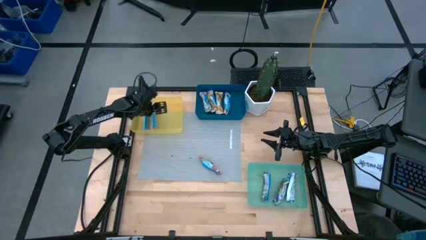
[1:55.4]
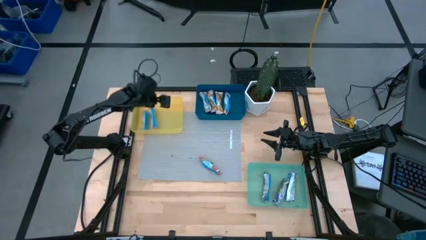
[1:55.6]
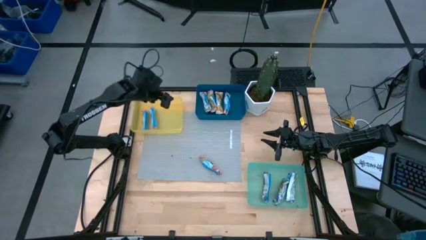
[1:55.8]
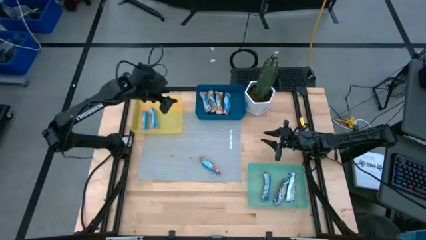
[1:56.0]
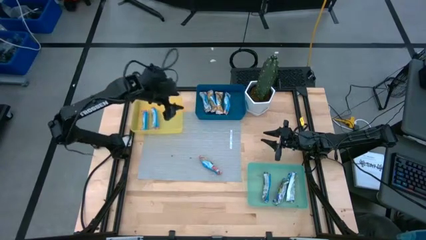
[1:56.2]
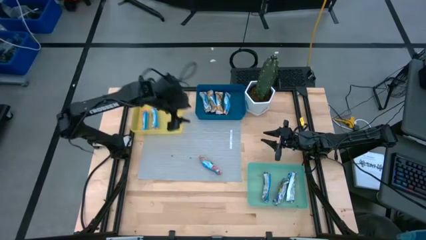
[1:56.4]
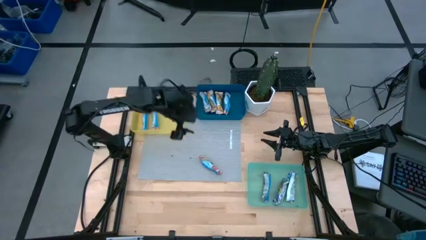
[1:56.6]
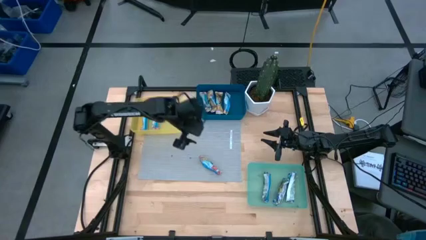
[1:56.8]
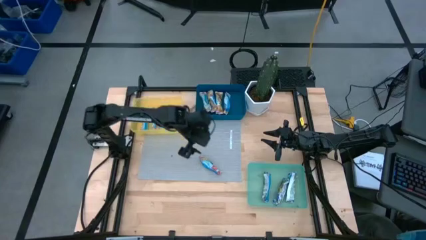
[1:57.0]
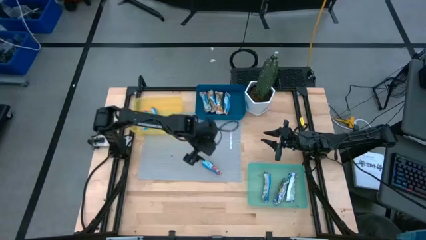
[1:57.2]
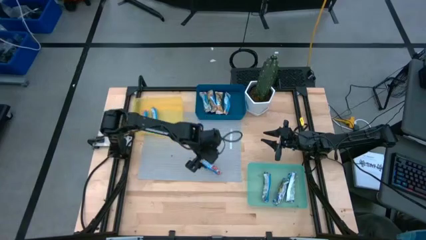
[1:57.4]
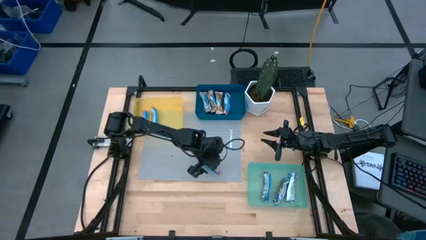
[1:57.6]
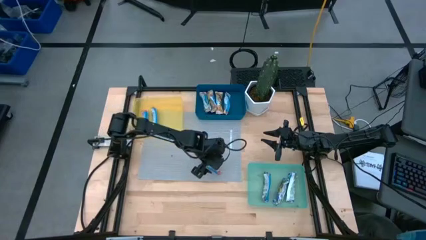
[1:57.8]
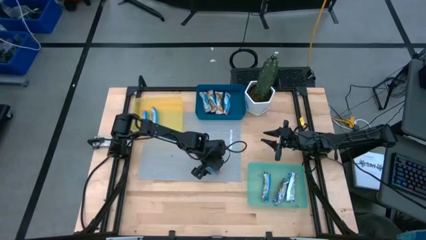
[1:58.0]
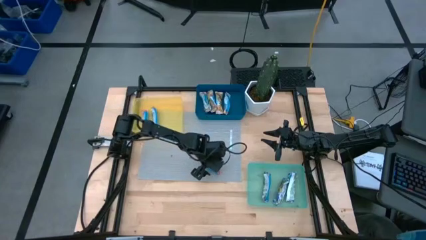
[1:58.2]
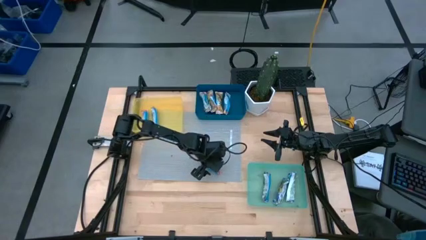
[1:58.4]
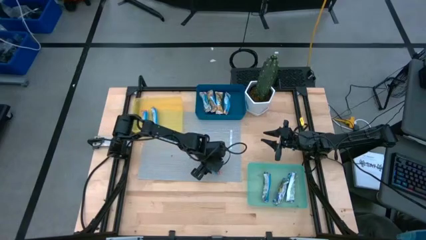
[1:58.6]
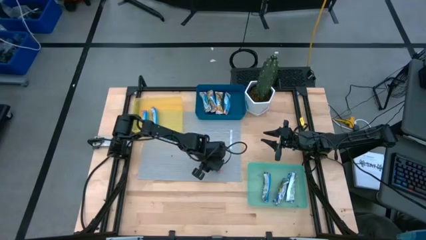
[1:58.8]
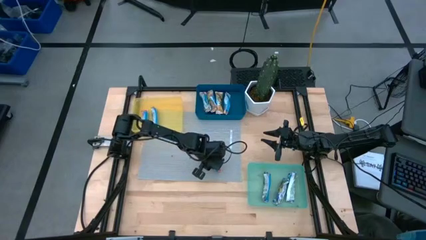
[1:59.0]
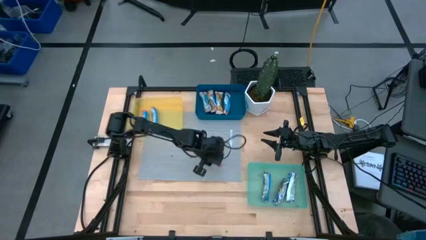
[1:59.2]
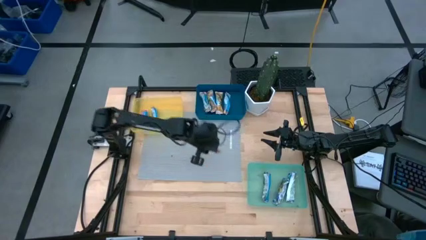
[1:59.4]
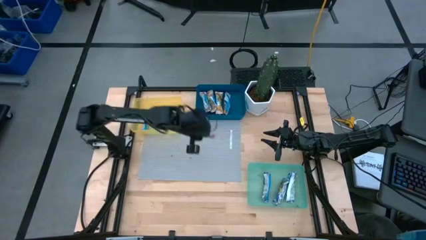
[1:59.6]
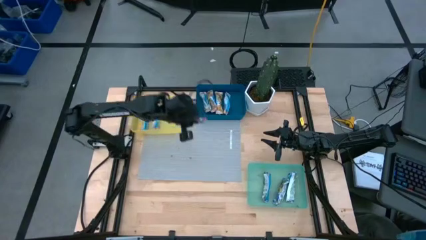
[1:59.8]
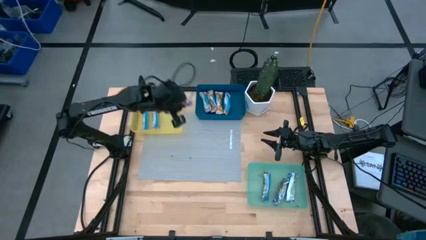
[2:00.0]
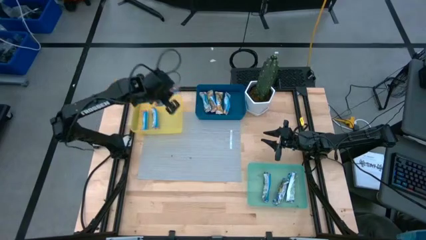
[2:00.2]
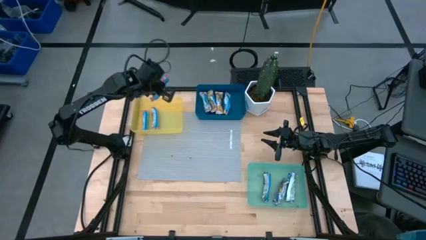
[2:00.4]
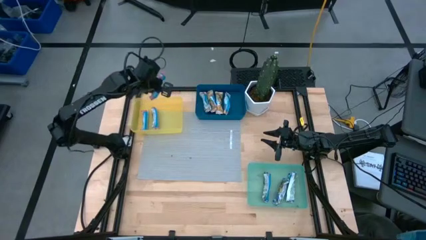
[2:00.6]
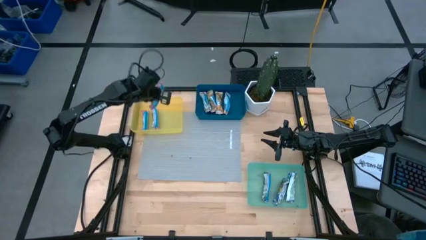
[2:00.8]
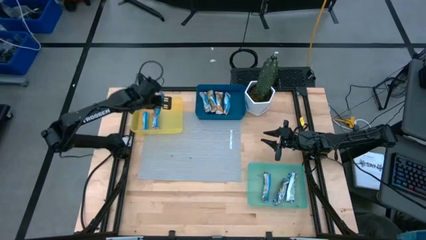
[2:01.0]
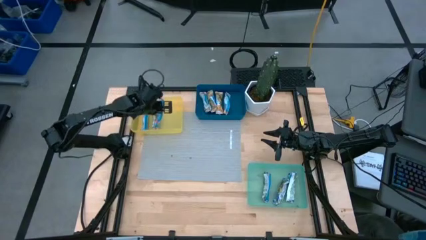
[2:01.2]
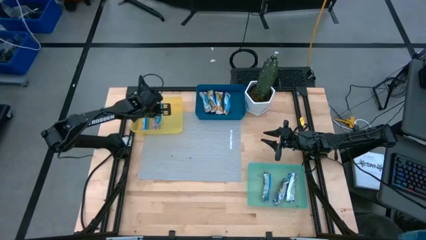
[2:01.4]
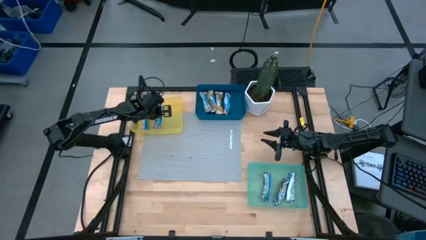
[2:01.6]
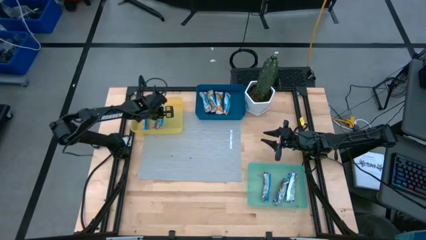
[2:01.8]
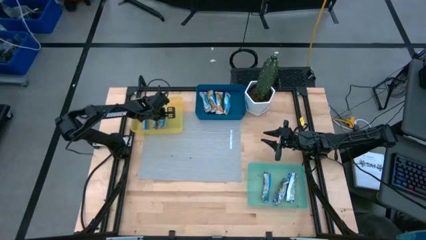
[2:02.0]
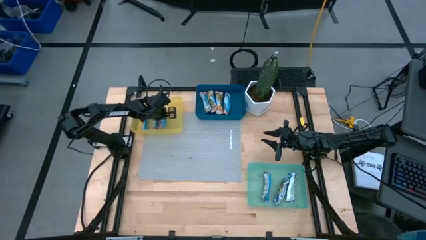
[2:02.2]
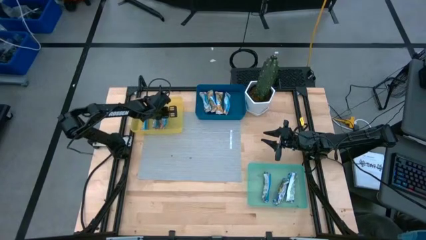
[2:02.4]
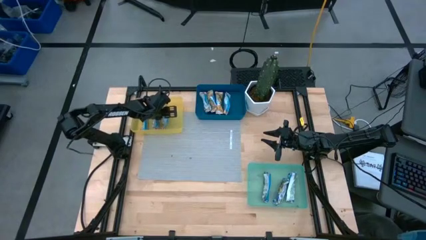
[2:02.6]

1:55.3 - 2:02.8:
Task: Pick and place Granola Bars by type
Put the red granola bar into the yellow bin

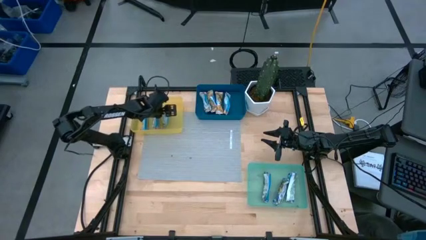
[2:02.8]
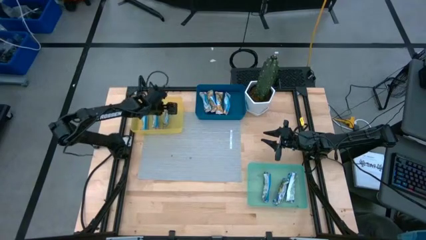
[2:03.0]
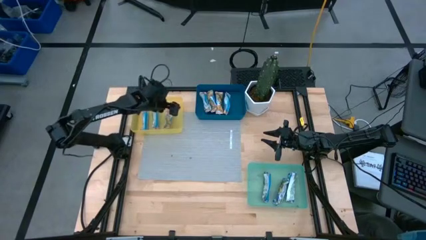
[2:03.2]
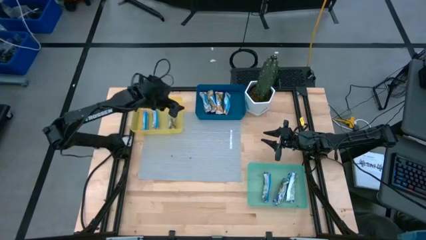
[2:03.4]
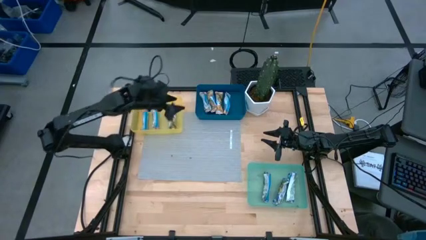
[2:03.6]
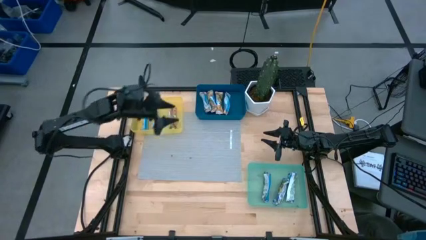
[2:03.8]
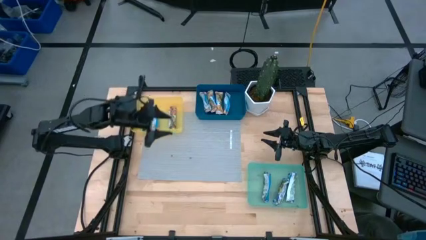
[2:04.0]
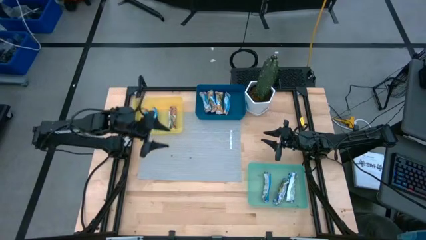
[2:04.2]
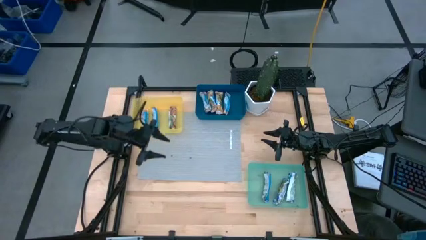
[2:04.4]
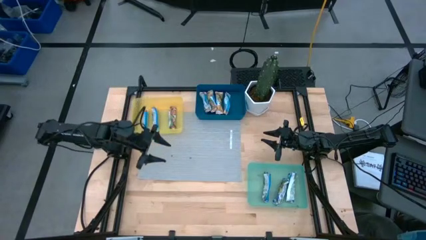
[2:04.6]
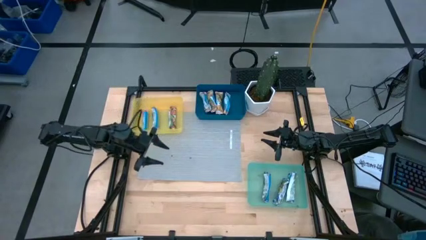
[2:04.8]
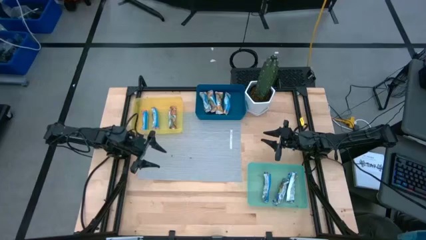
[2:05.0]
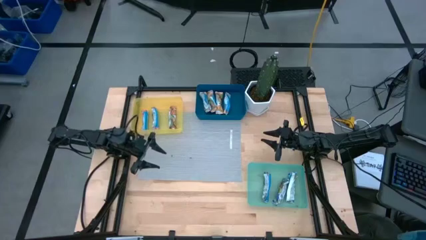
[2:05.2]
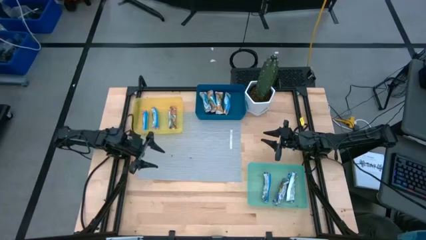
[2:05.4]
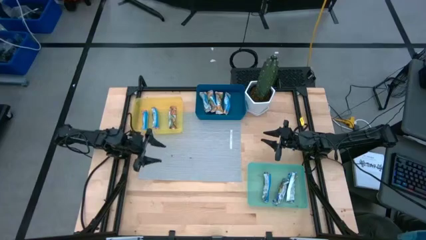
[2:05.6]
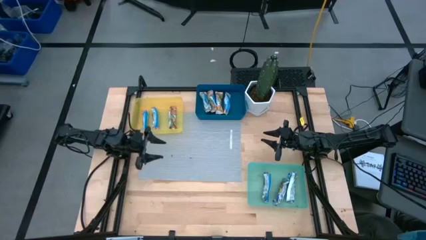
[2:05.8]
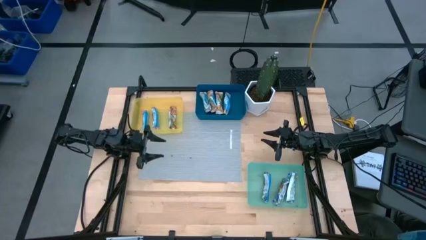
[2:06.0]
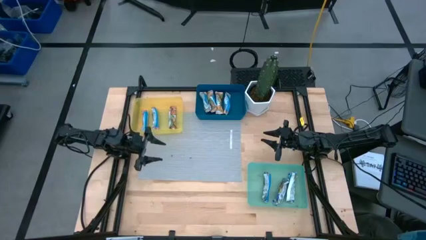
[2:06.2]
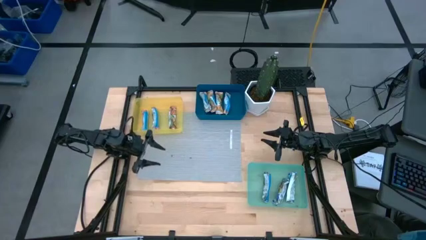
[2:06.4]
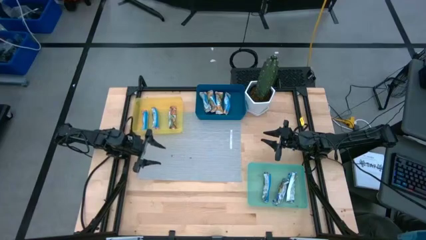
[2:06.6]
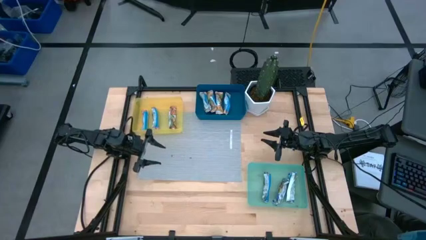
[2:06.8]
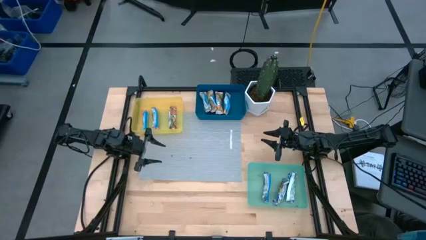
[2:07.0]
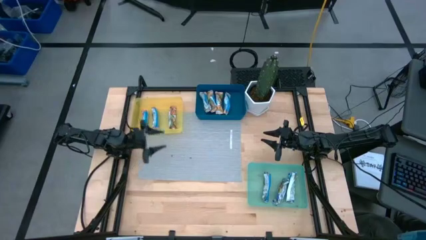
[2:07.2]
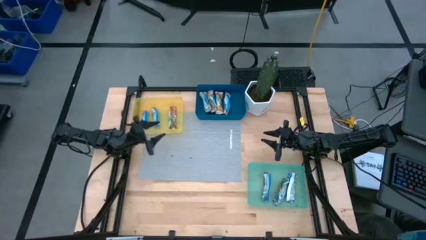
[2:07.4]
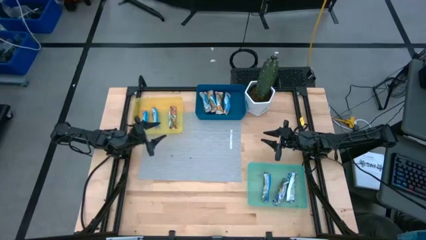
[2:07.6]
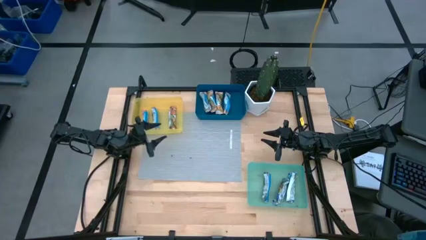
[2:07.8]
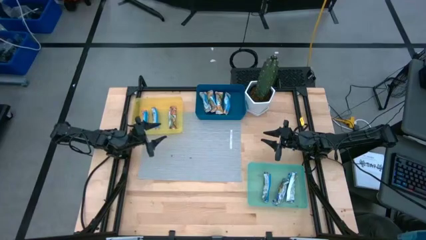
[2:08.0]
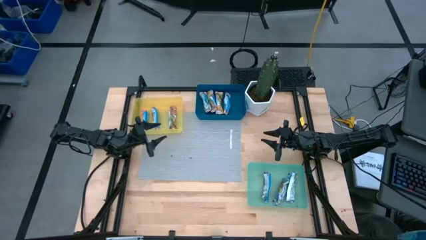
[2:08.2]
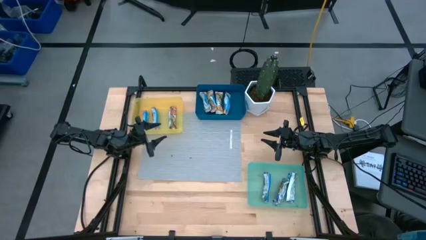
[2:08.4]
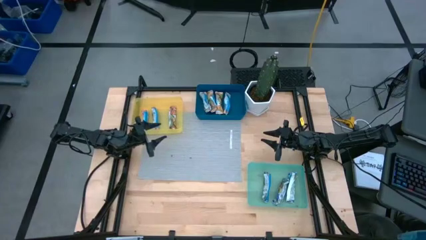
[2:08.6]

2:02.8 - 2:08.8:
Return to Home Position
